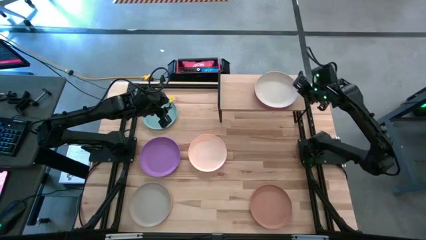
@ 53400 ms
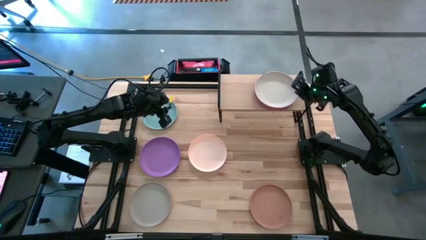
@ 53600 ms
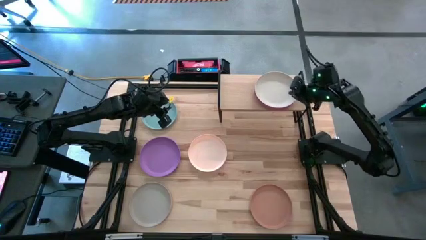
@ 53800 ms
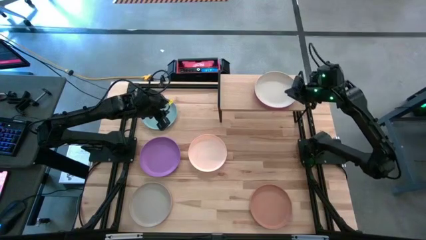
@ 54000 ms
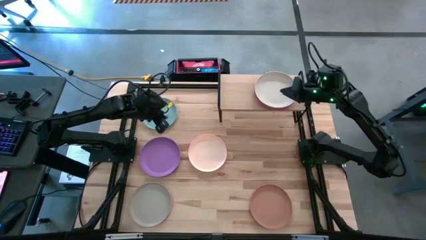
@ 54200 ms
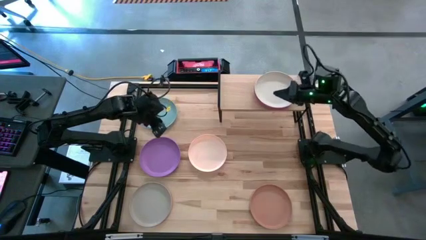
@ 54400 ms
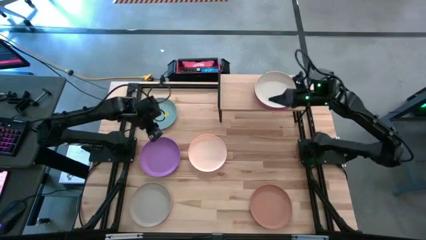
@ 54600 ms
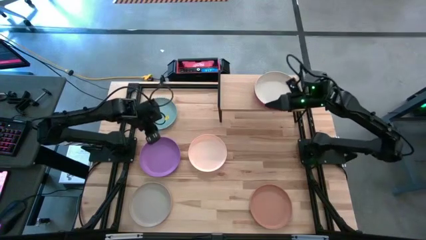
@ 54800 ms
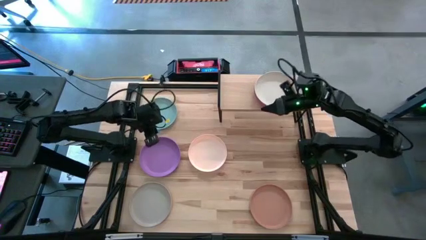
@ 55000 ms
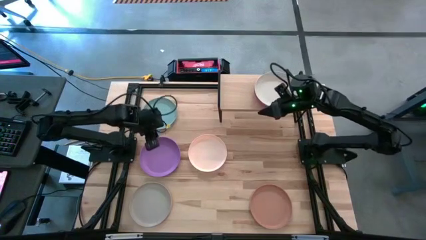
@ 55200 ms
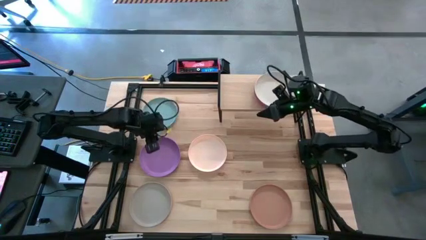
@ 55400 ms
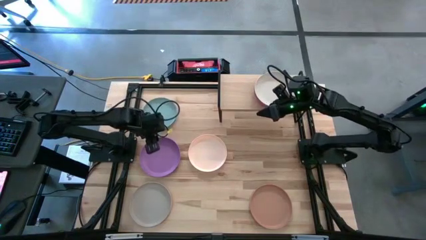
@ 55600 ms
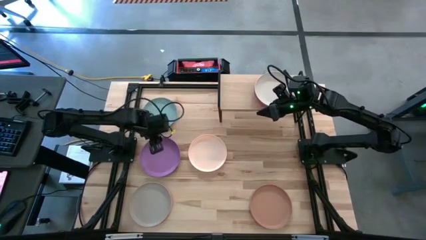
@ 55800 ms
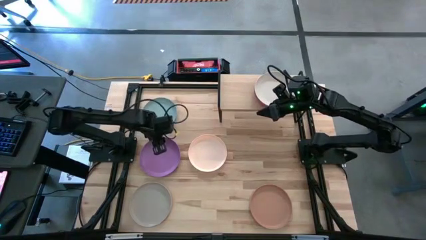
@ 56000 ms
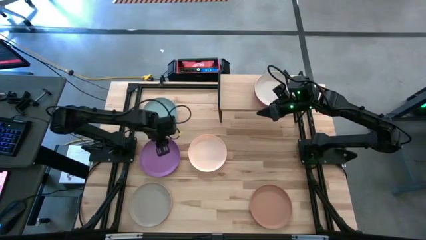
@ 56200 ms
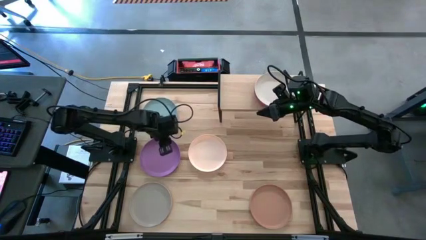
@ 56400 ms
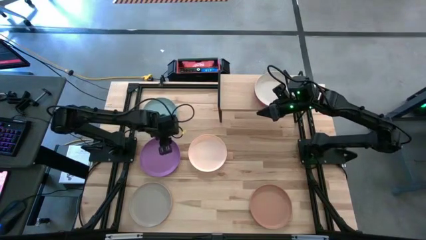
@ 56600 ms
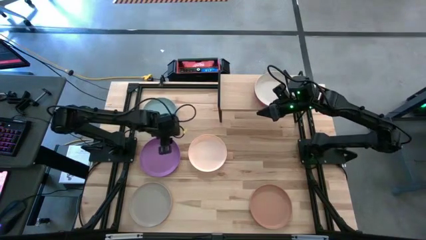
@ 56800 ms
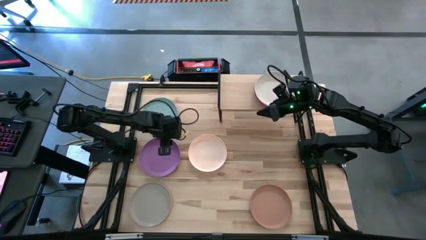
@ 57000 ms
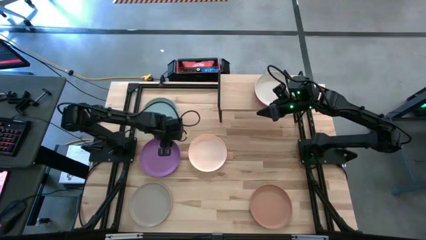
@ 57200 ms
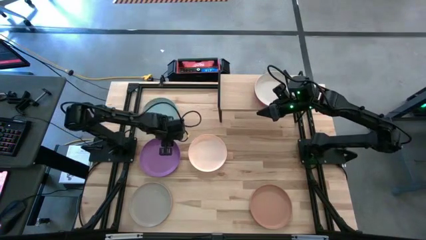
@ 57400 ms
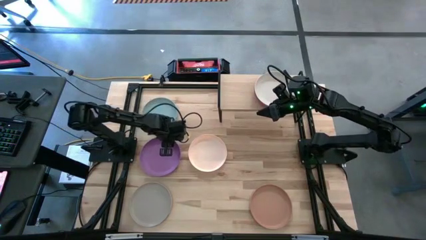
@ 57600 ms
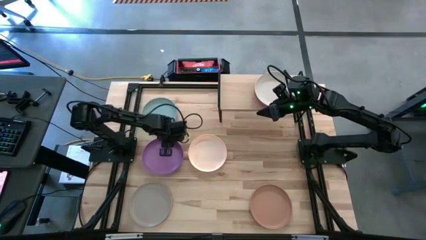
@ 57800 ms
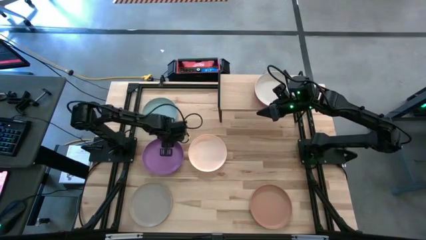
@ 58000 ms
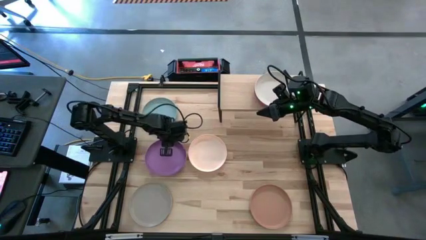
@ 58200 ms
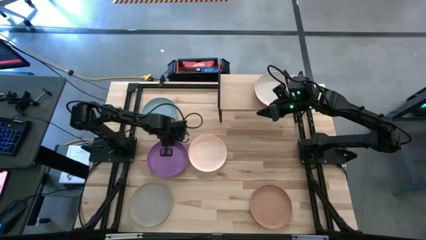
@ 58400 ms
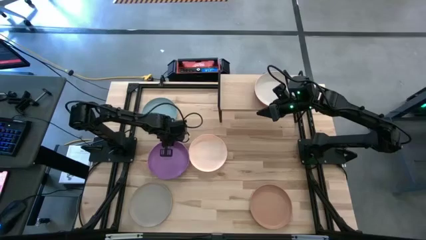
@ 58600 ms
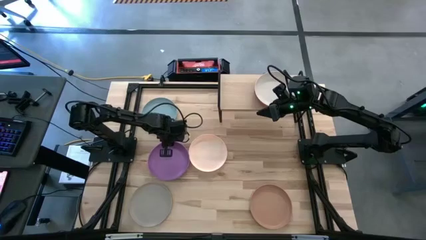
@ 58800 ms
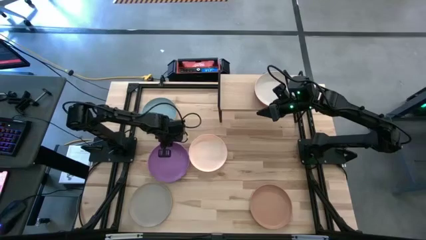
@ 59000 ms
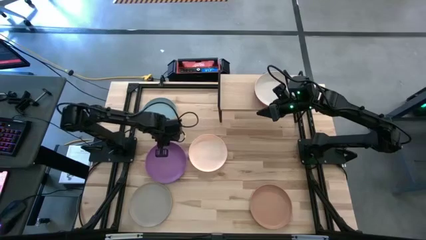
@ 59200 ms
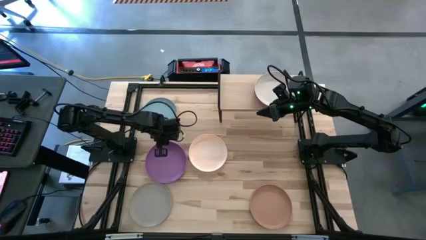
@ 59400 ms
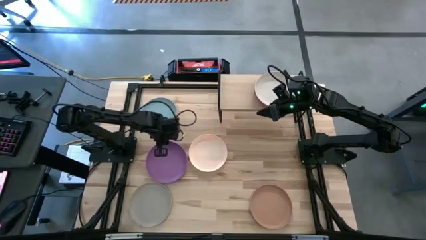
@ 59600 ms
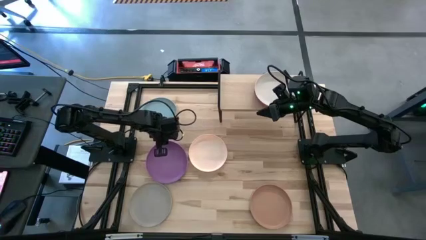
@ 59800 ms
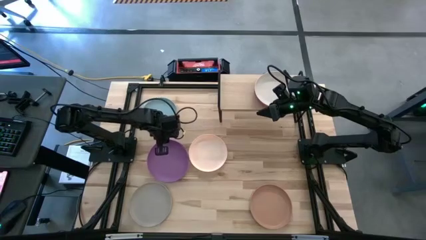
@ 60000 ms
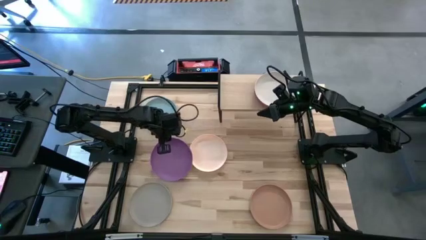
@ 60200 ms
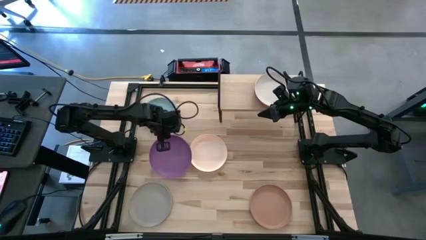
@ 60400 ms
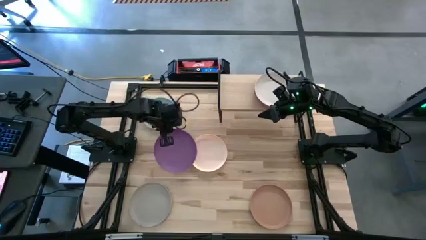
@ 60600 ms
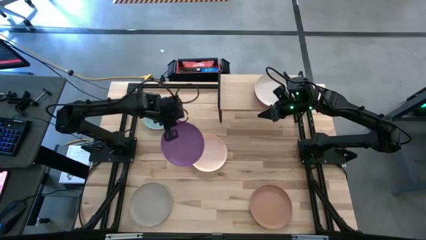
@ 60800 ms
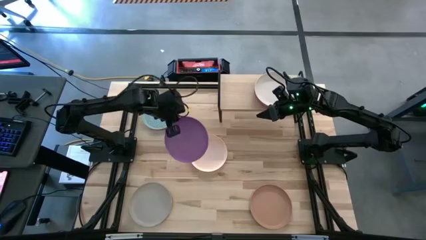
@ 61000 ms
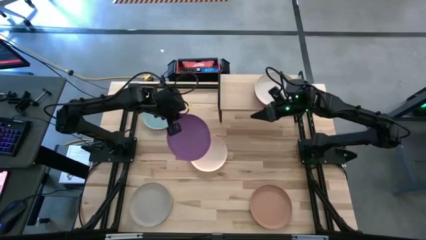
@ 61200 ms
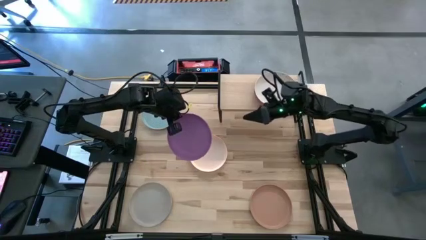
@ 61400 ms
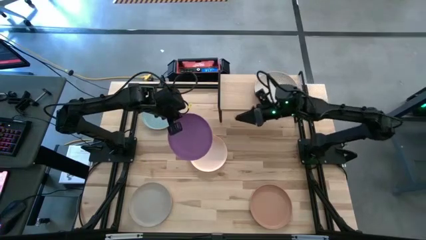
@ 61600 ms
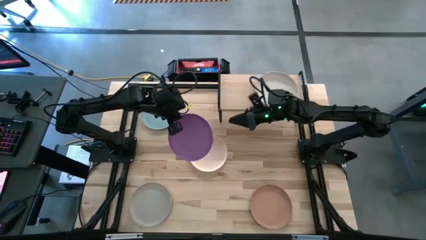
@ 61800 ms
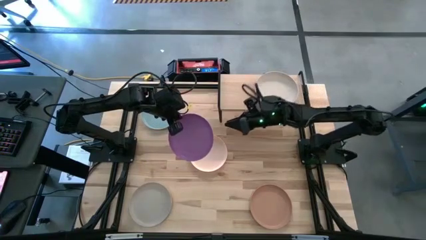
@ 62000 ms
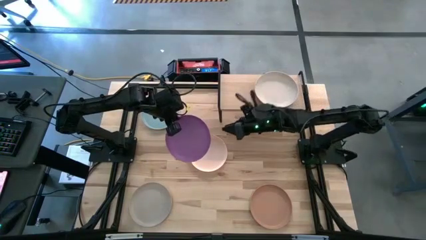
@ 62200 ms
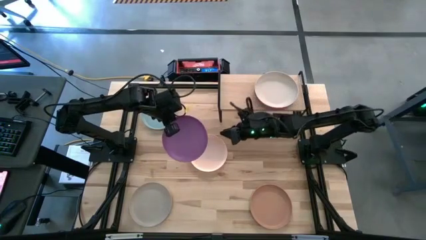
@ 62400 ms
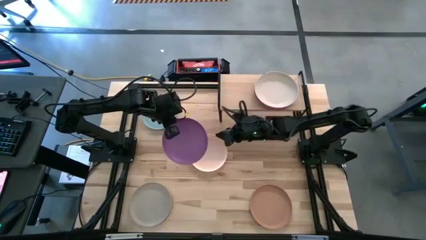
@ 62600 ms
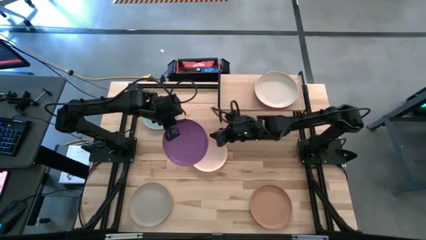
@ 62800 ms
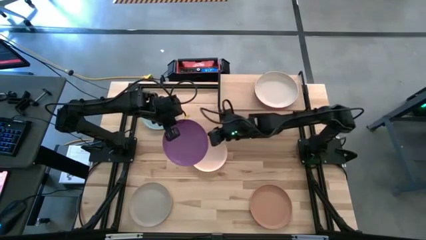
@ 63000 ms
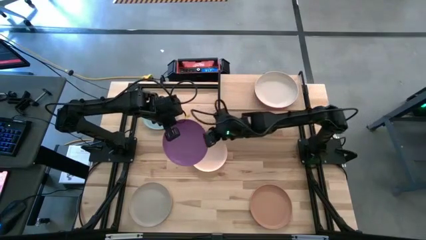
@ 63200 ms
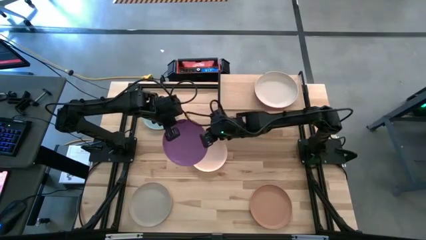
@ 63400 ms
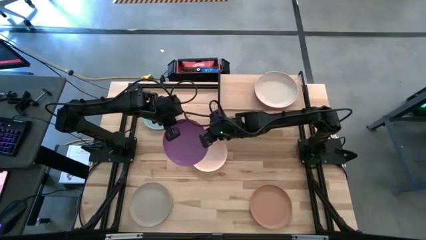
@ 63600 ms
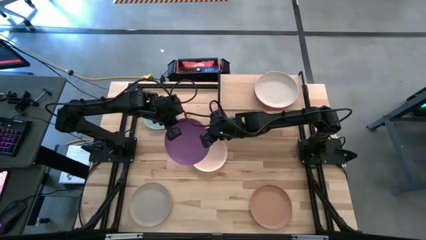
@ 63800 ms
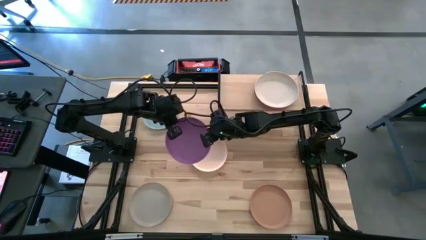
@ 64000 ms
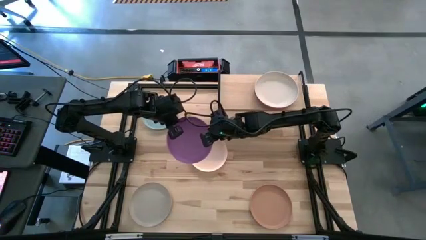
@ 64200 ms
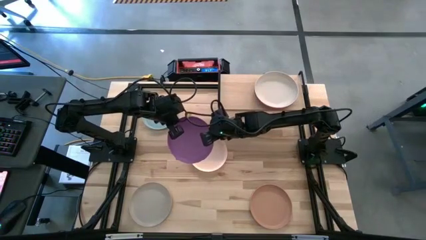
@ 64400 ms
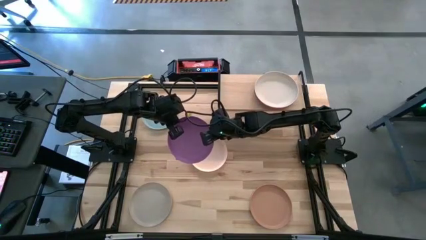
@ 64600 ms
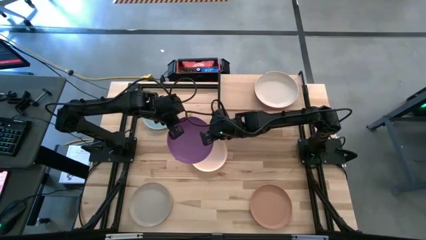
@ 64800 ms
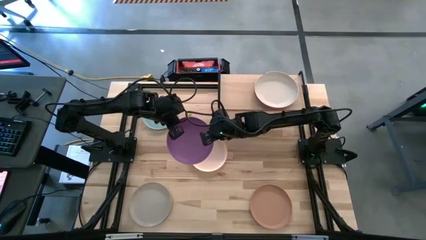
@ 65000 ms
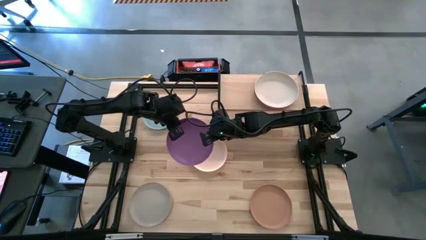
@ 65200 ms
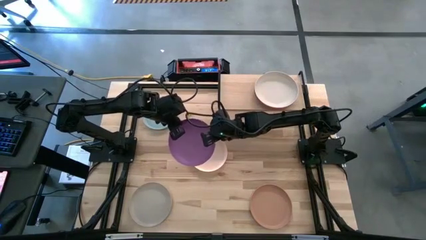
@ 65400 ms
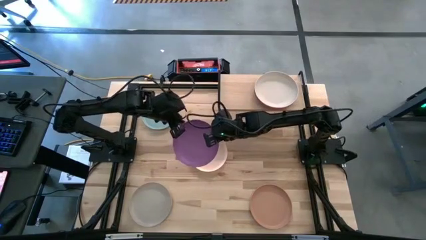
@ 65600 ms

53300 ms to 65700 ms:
Task: Place and stack plates onto a shelf
Stack the purple plate on top of the white plate on the shelf
